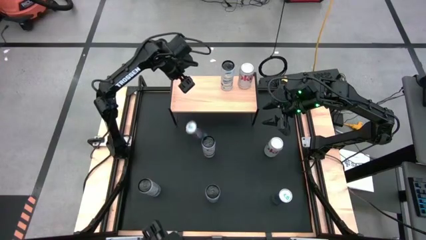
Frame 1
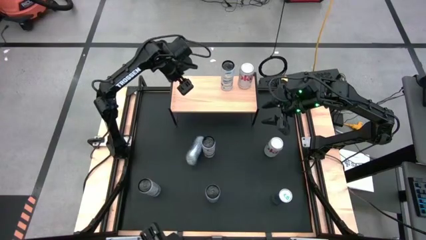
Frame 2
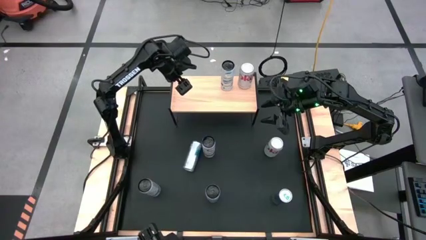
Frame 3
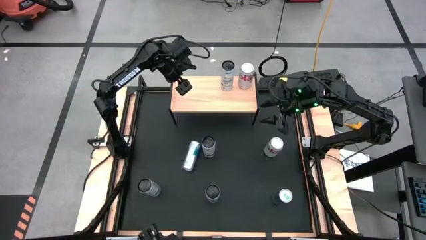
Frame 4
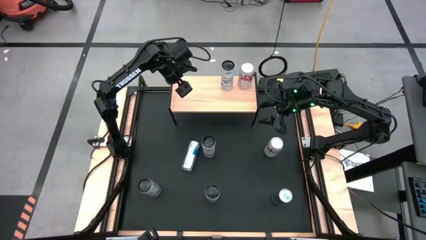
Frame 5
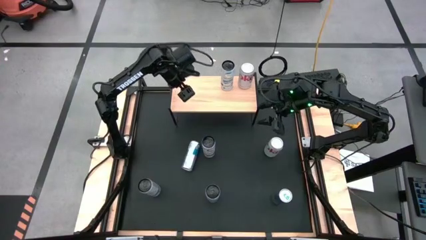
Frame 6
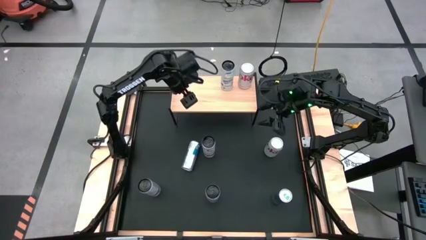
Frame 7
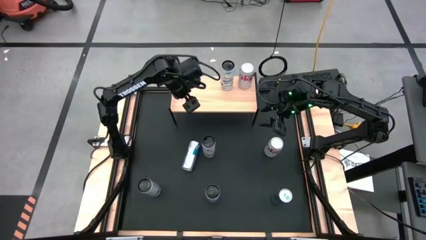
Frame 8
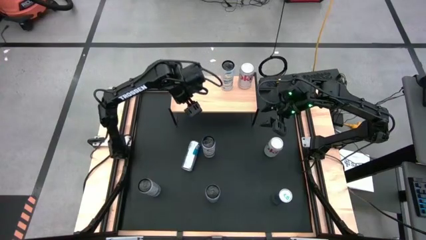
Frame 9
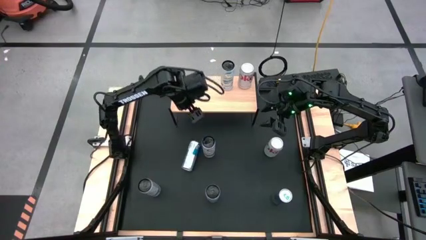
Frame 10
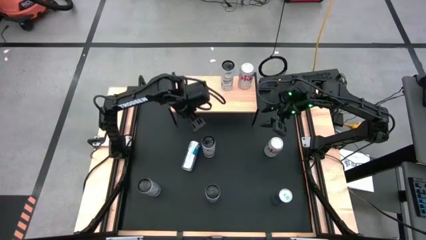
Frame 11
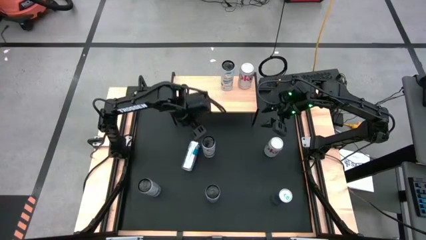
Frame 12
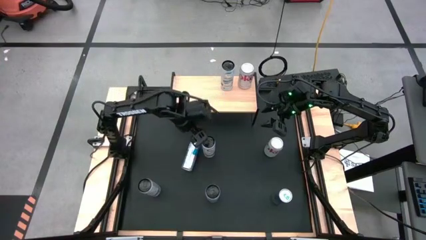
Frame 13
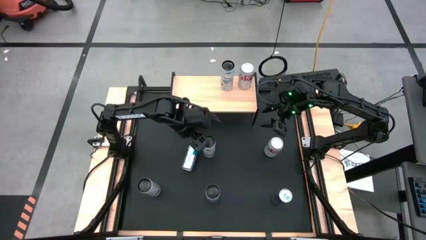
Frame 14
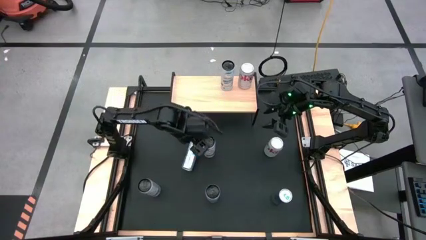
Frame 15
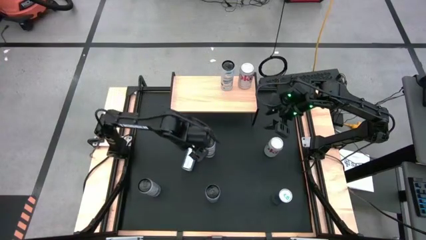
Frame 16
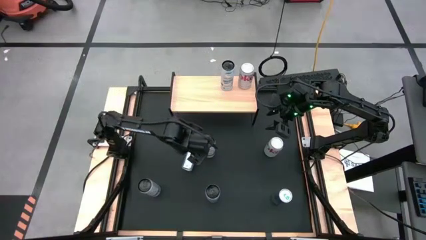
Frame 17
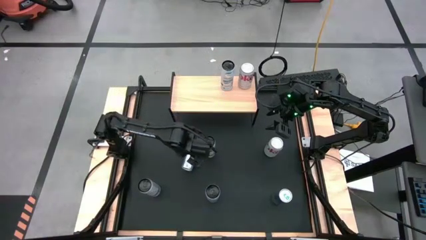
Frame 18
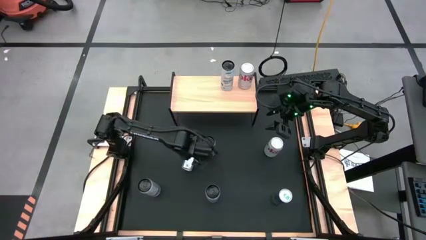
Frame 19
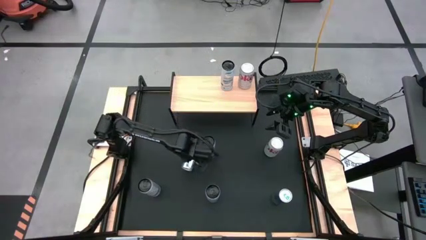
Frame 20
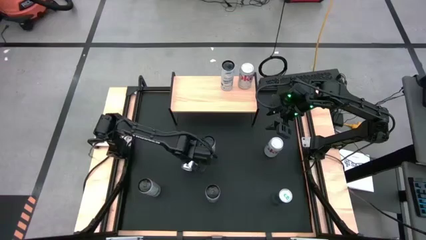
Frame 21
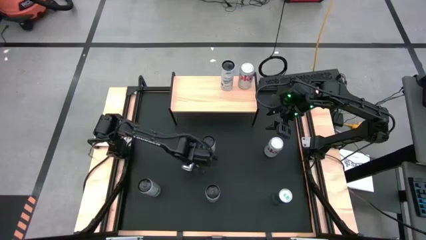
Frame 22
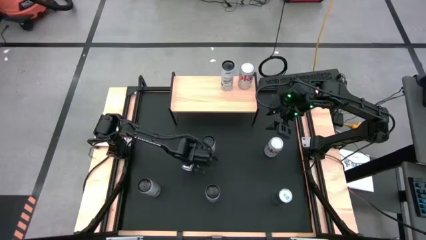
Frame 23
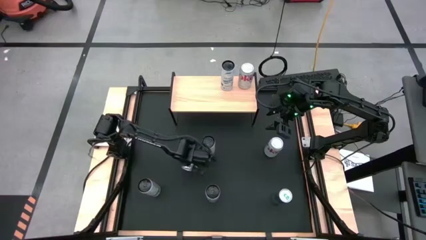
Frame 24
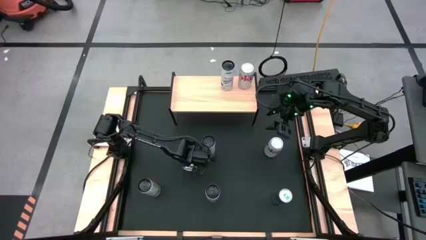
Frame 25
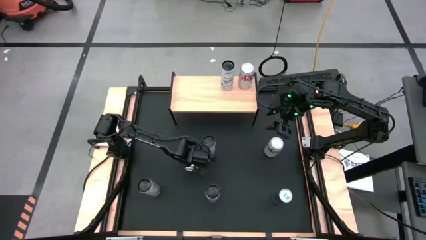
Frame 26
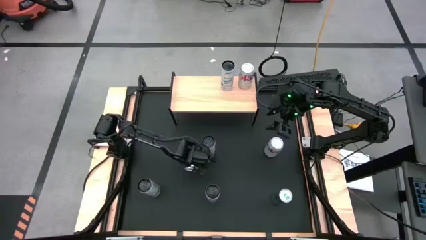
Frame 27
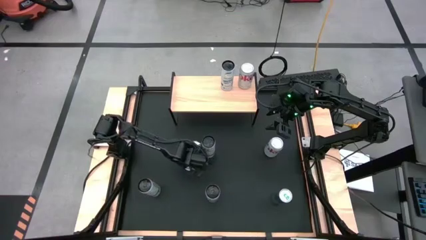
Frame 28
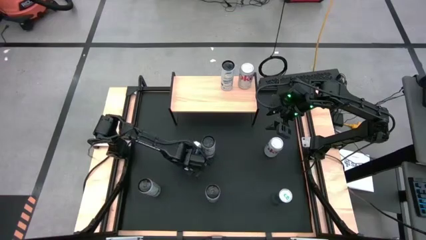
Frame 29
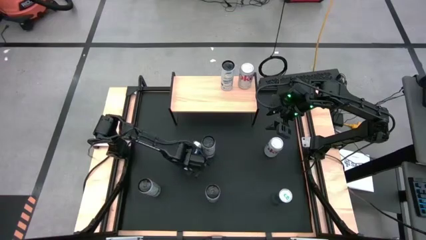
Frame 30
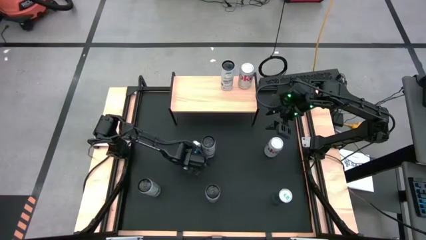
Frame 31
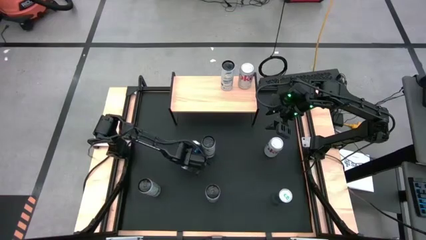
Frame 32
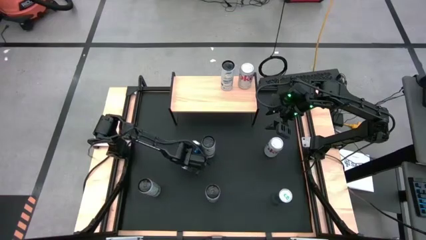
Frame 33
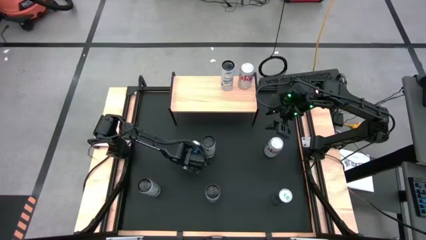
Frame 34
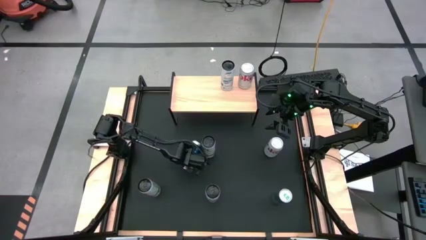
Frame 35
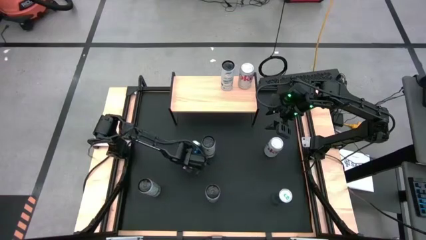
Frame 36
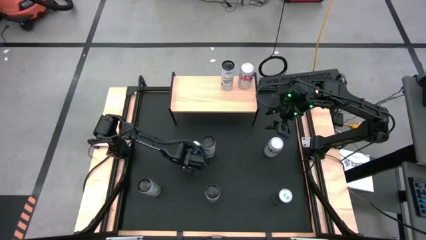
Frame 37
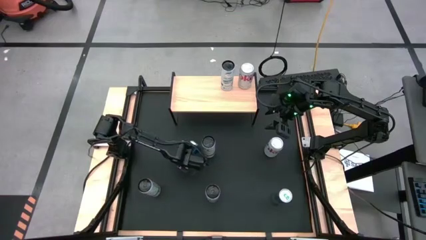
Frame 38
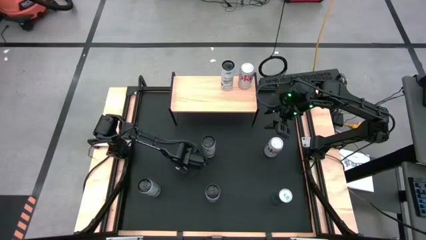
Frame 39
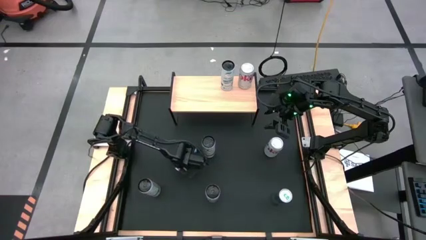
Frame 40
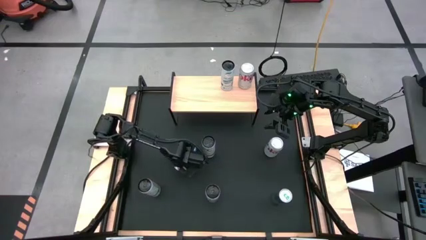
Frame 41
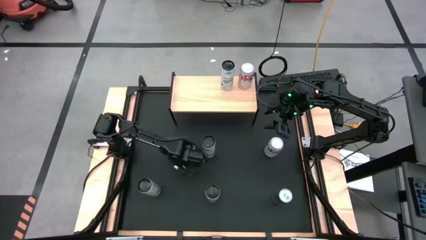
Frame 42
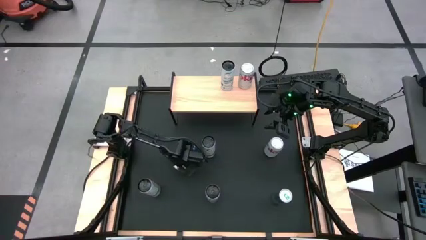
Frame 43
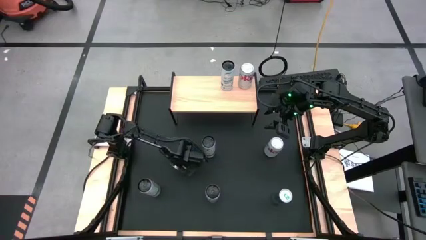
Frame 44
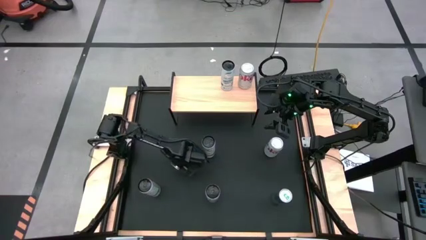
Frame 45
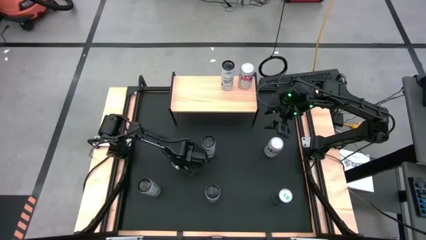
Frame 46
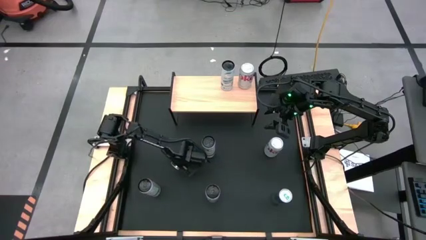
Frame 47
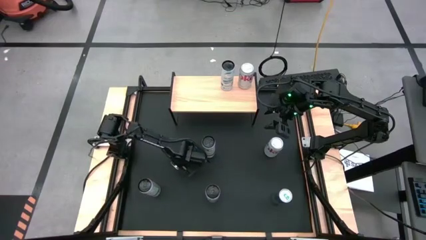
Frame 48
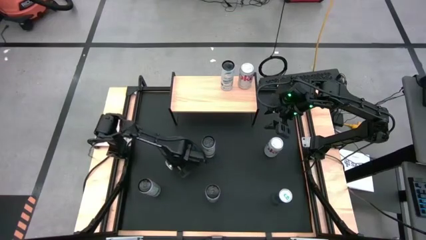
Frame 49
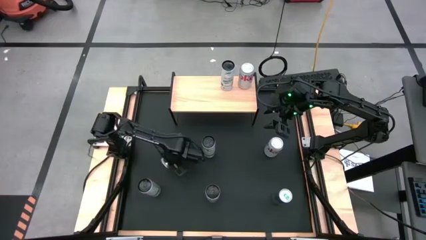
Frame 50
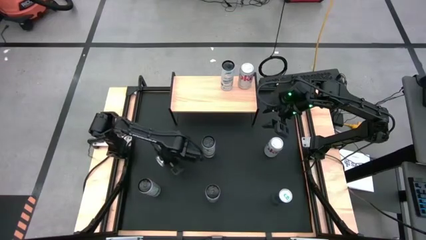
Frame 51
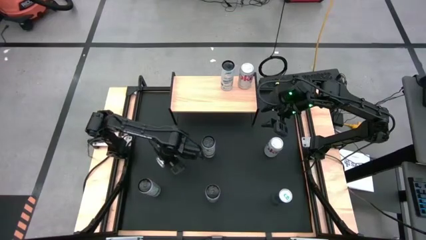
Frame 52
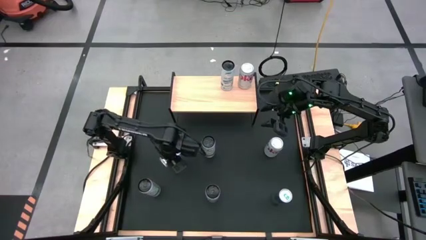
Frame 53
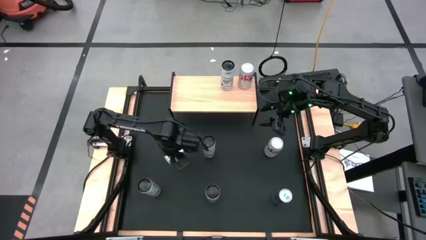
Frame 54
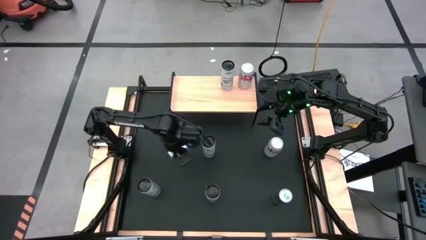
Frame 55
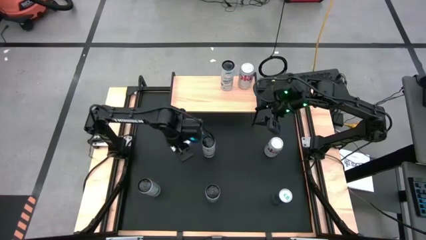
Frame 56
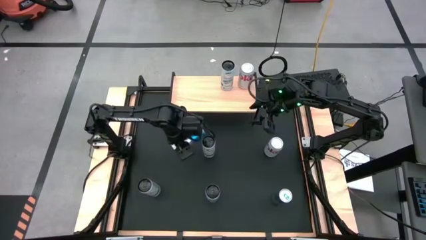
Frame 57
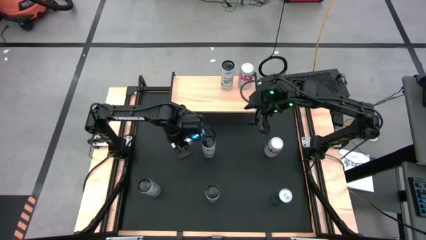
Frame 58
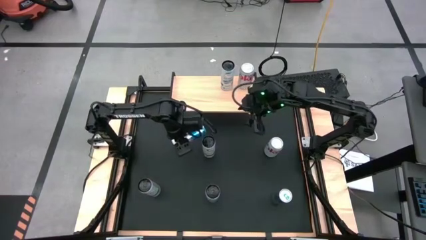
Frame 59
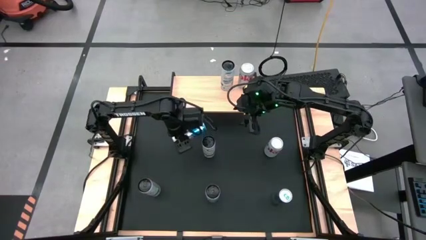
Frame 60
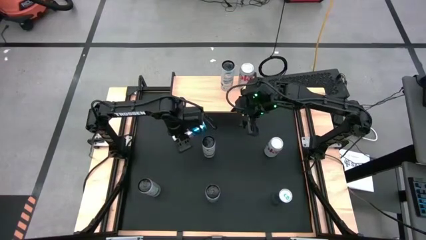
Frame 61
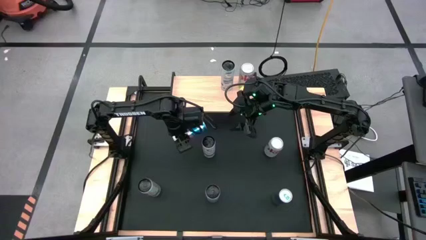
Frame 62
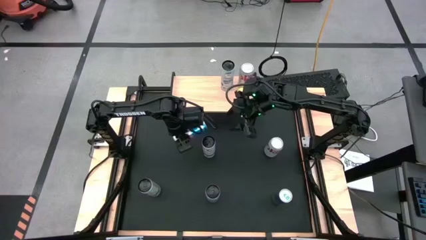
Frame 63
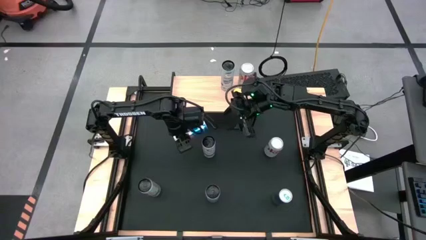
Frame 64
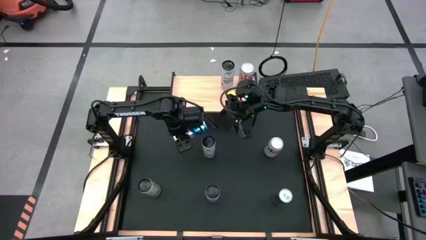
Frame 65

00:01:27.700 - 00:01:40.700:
Task: Place canned beverage on shelf
Put the top left blue soda can on the shelf

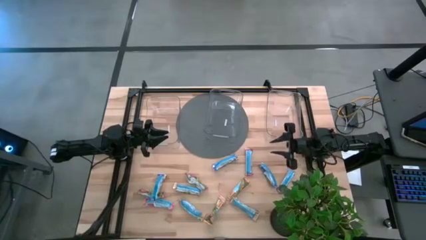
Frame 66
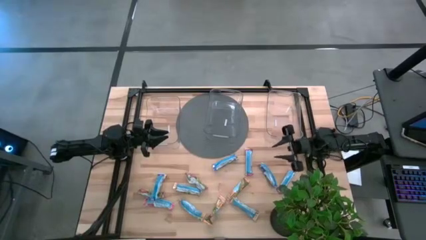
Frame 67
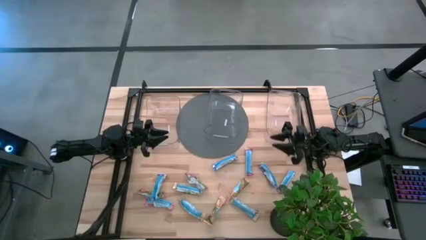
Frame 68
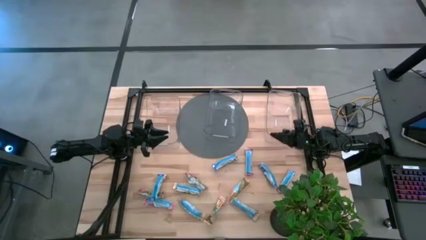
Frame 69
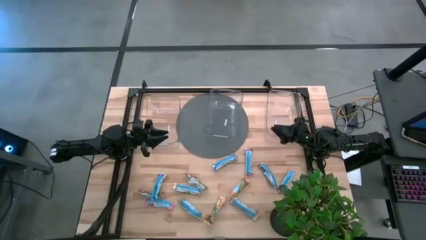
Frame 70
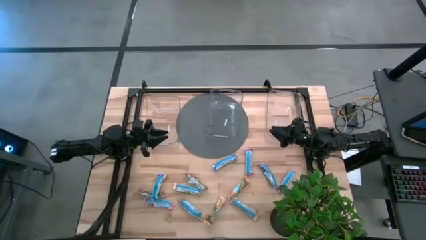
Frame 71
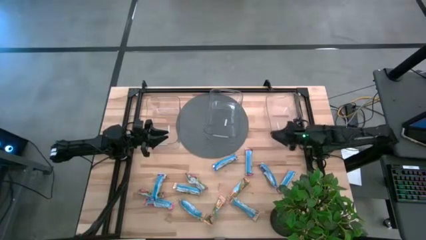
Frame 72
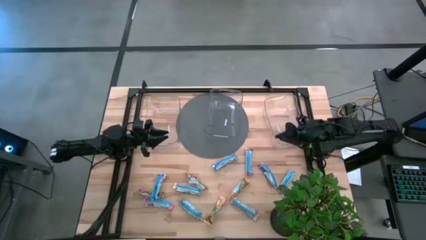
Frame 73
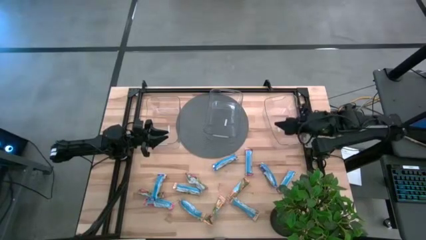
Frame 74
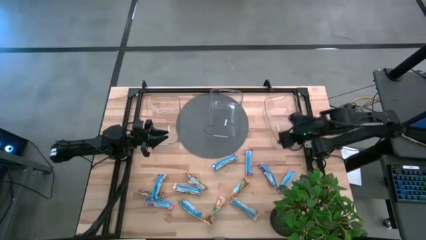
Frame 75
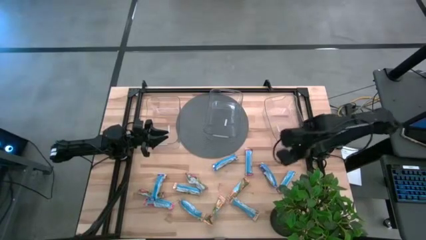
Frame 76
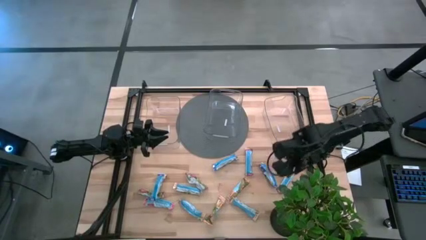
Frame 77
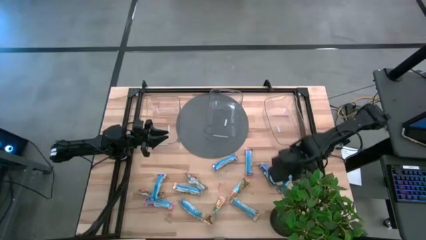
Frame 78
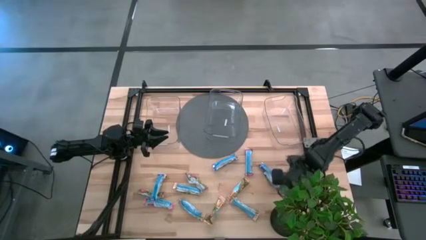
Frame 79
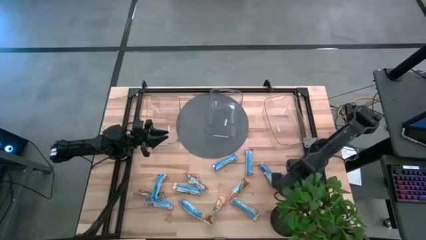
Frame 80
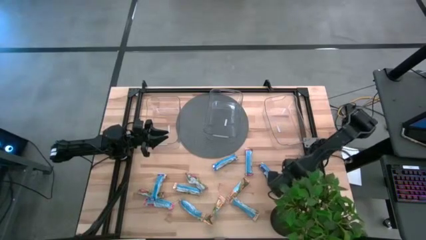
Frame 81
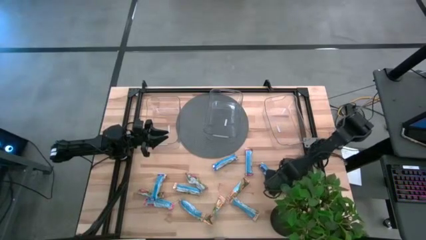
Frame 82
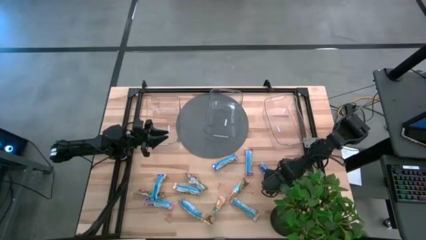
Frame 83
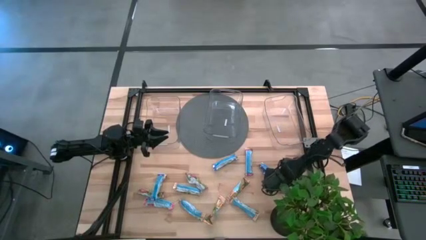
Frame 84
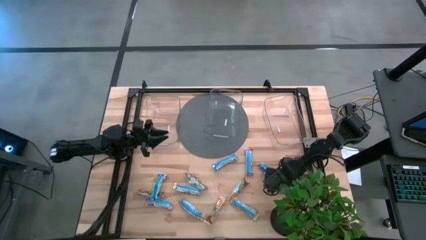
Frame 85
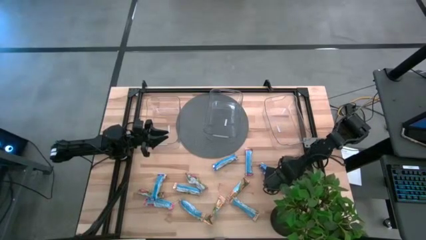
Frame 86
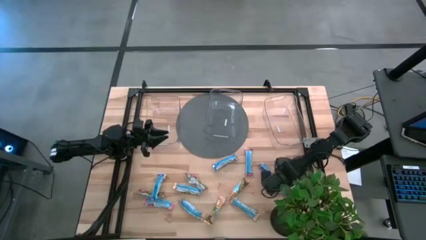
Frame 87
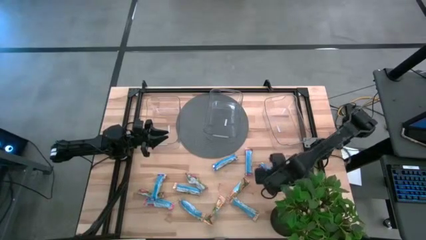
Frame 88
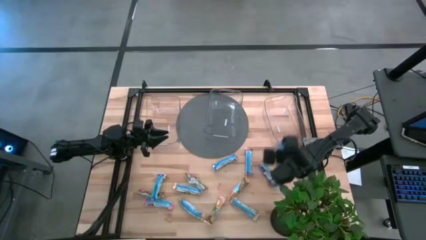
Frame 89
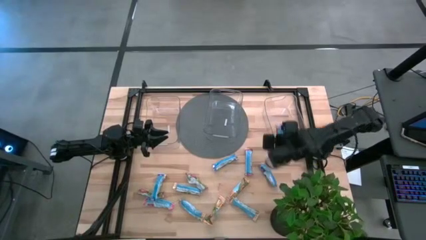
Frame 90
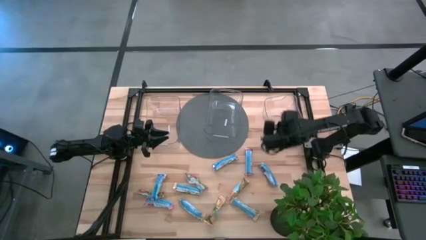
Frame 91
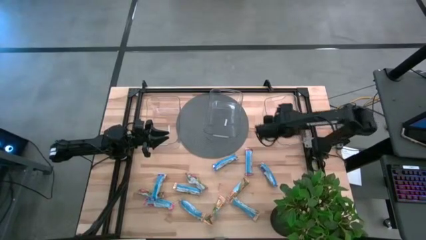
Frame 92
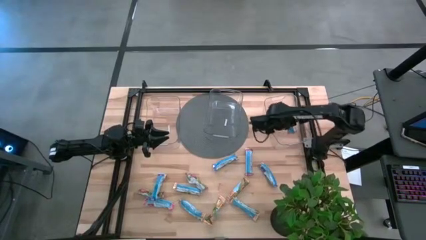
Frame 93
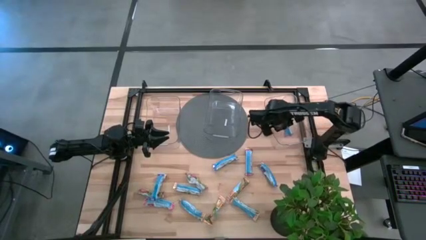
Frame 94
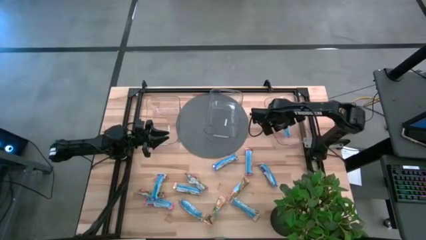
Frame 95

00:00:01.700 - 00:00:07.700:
Task: Pick and place Granola Bars by type
Put the red granola bar into the right transparent bin
